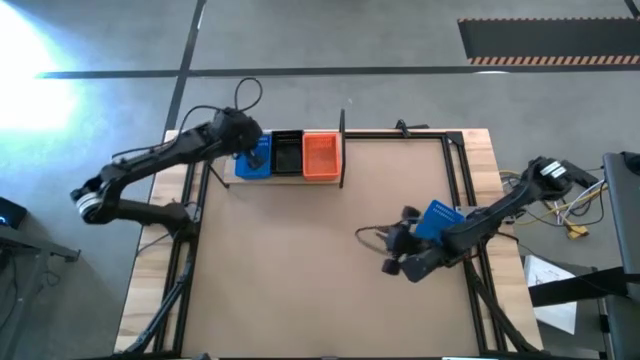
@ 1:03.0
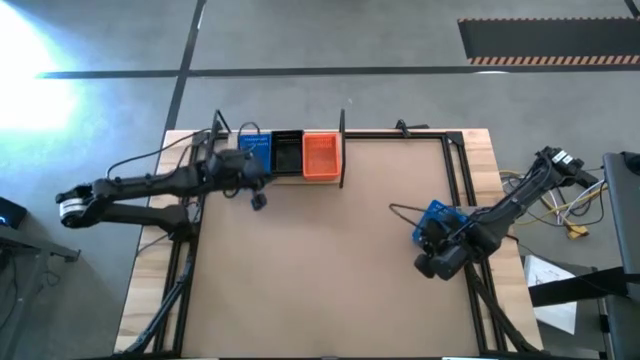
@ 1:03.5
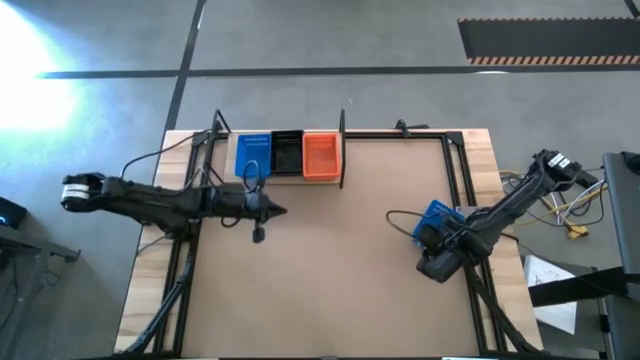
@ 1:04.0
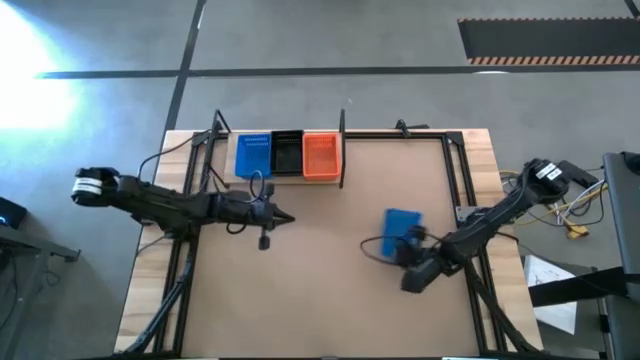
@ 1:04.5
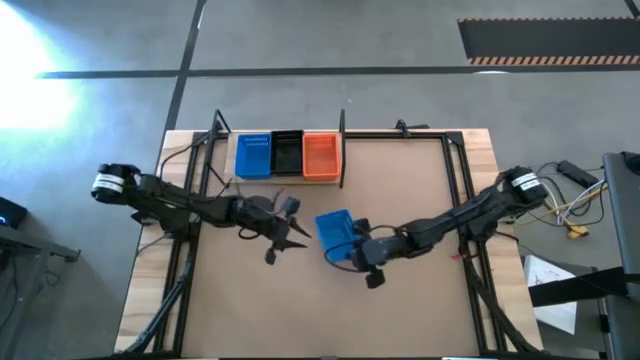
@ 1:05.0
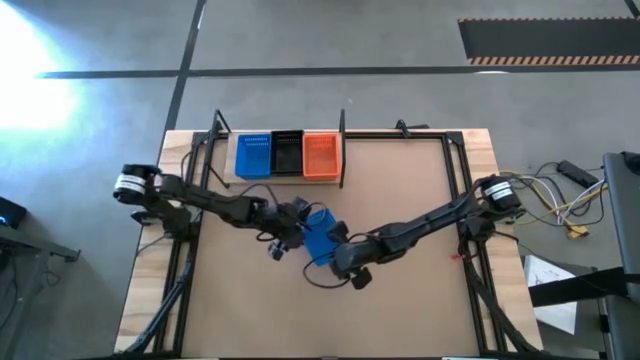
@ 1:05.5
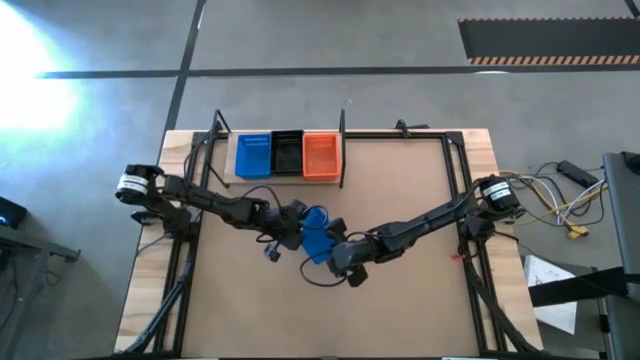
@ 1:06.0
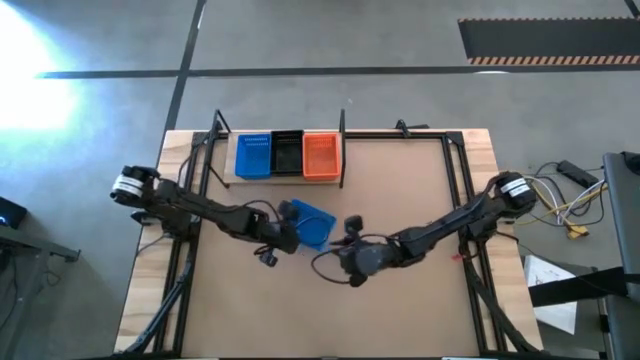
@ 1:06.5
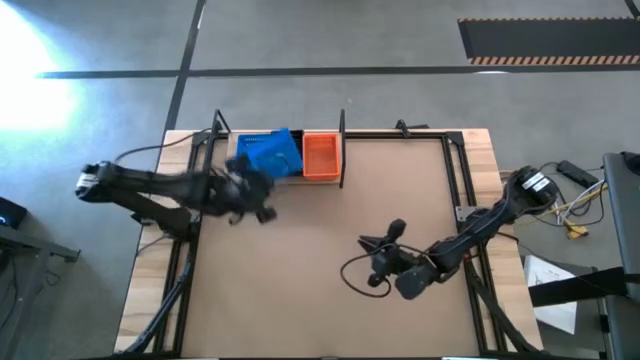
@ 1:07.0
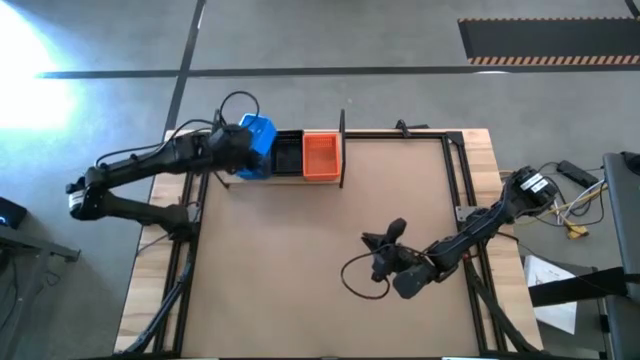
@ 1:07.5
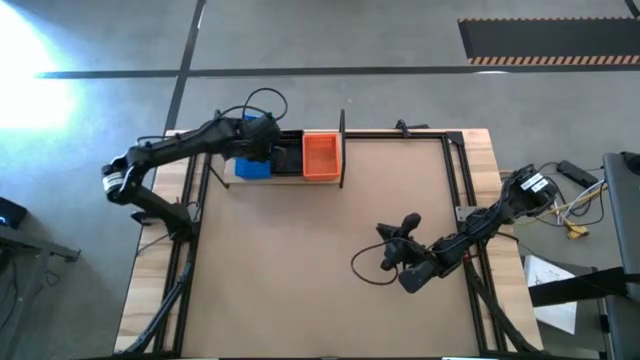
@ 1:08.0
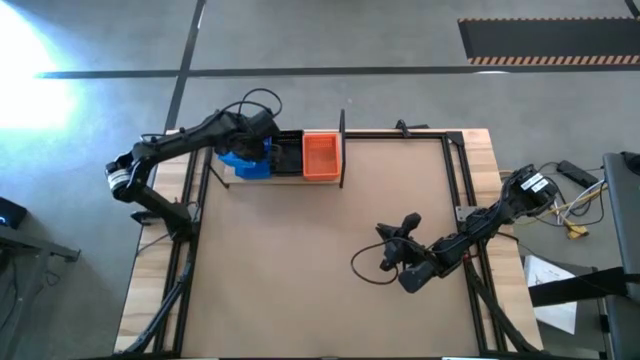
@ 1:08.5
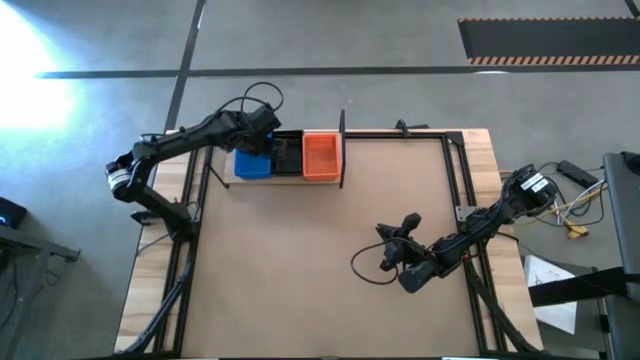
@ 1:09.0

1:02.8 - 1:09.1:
Task: Stack baskets on shelf by color
Stack the blue basket on top of the other blue baskets on the shelf

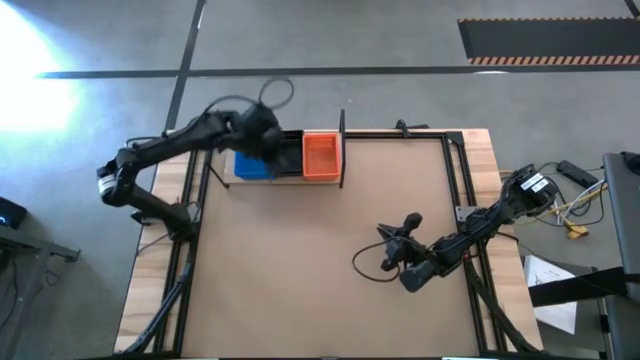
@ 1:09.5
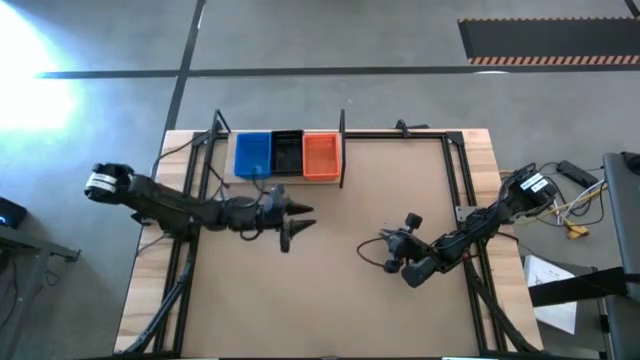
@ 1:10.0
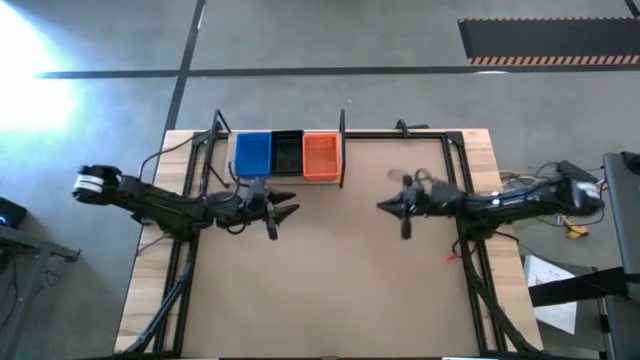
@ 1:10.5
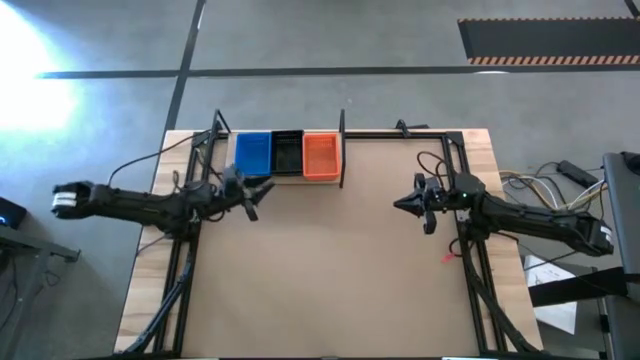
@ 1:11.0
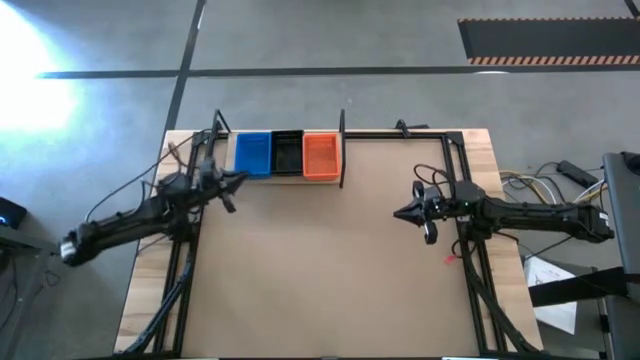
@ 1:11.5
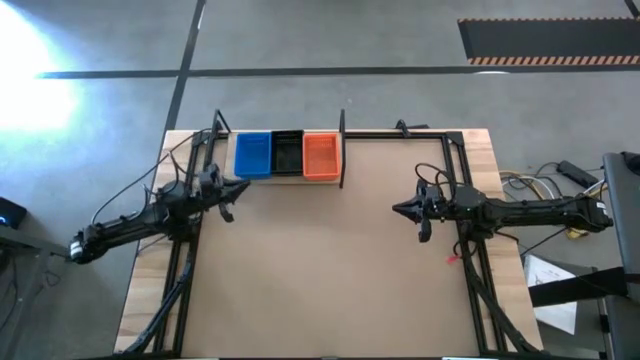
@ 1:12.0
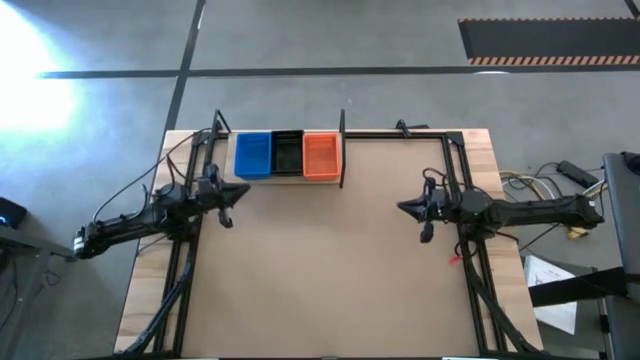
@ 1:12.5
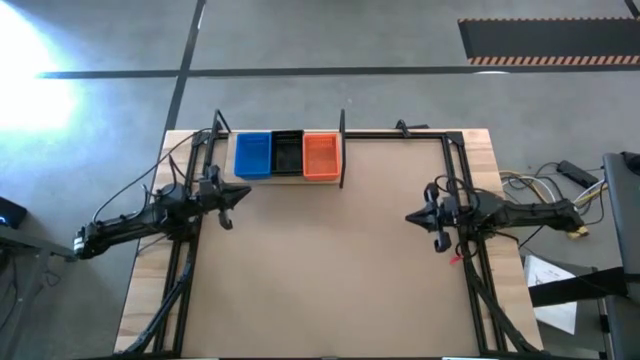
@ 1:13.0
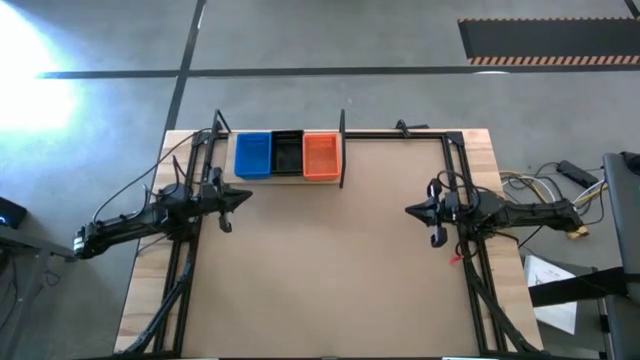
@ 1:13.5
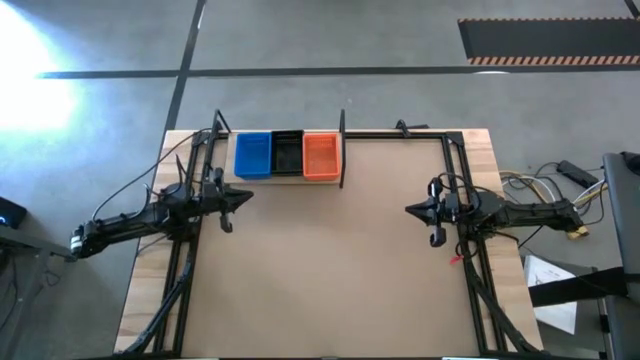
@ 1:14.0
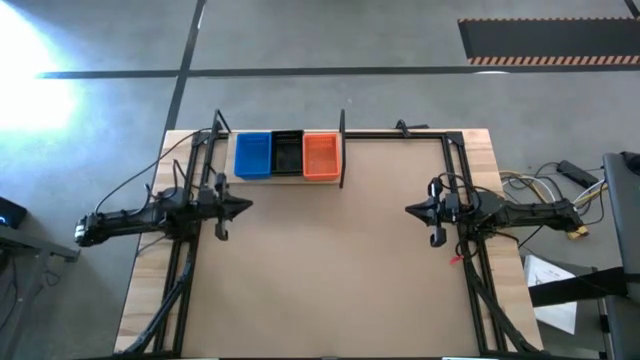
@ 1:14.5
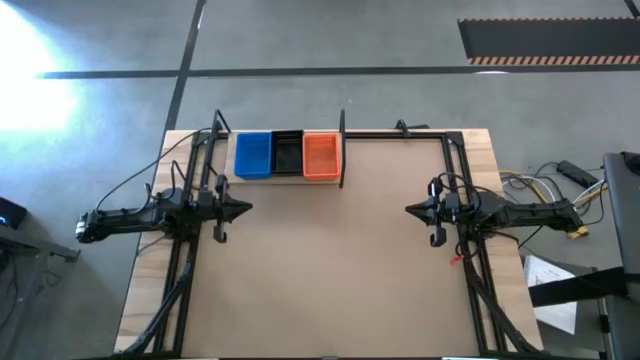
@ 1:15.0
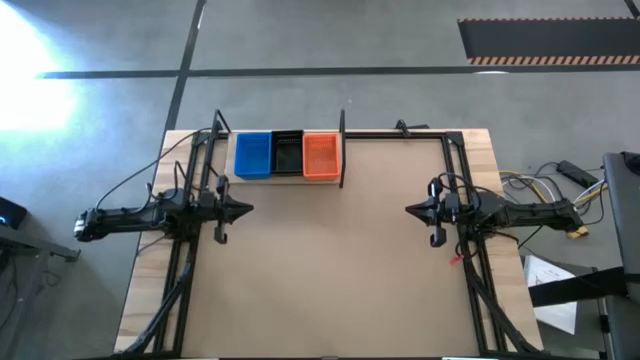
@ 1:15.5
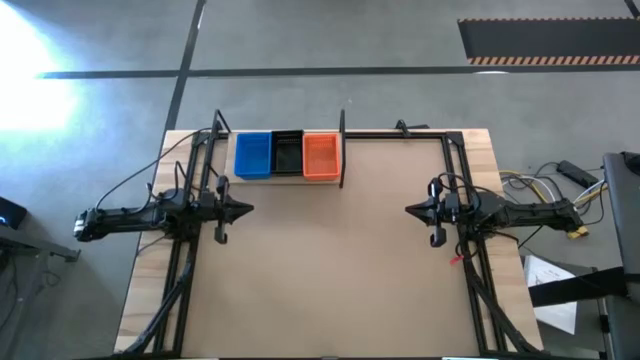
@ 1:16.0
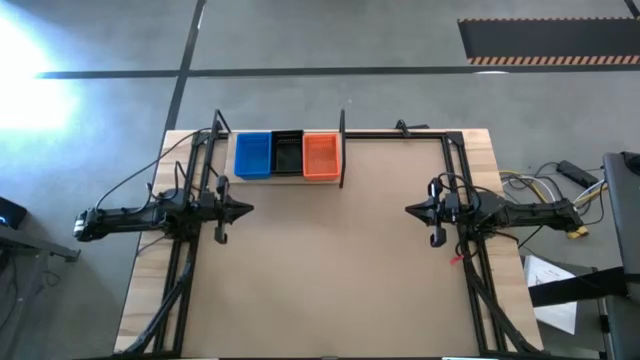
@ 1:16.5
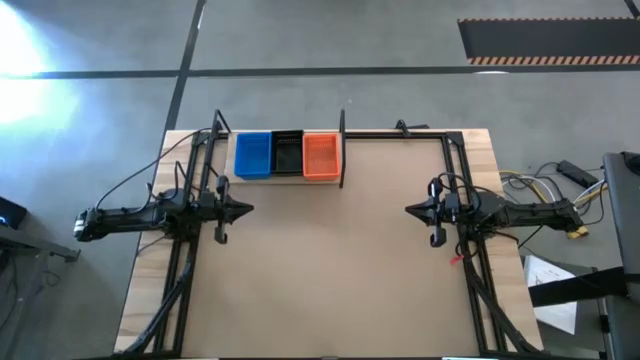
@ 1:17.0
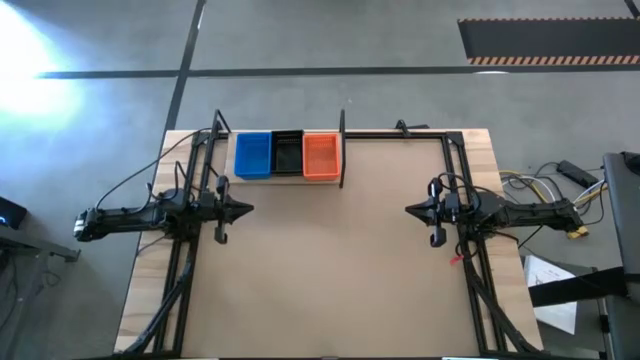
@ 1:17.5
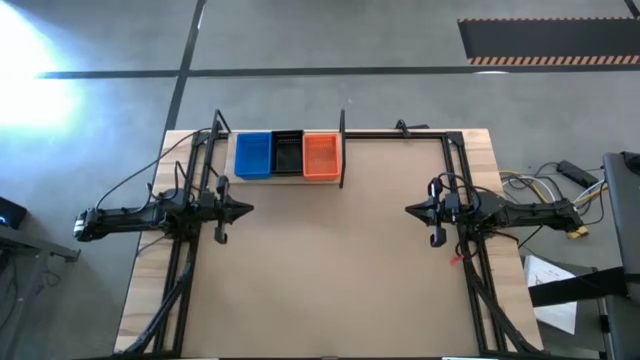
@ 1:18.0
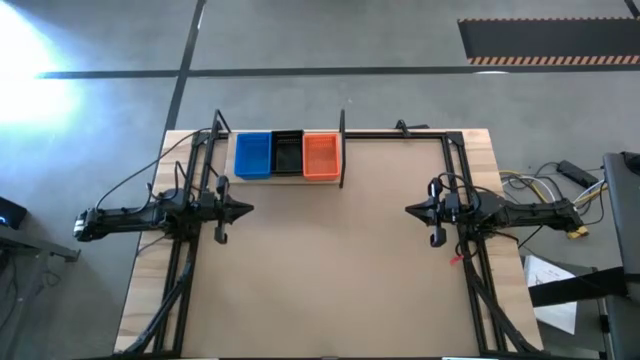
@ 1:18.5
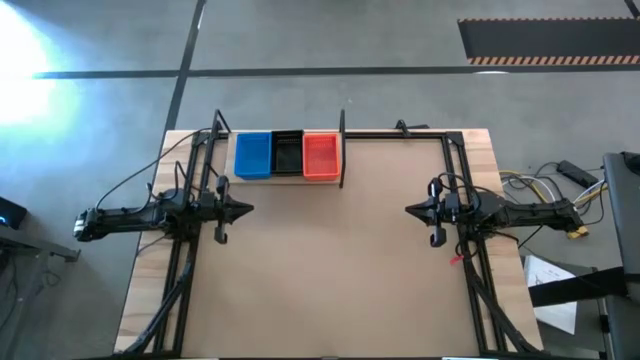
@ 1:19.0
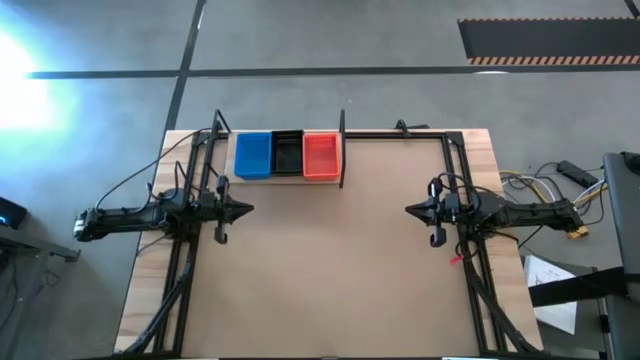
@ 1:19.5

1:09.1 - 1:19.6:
Return to Home Position

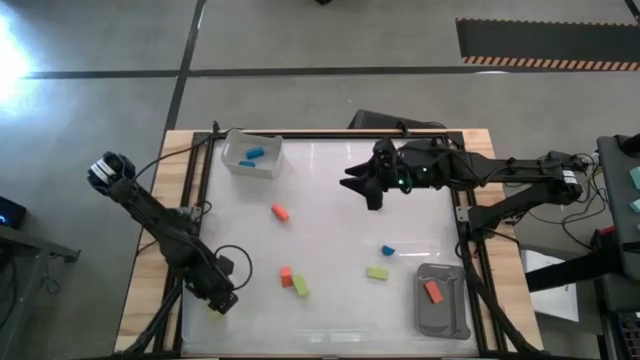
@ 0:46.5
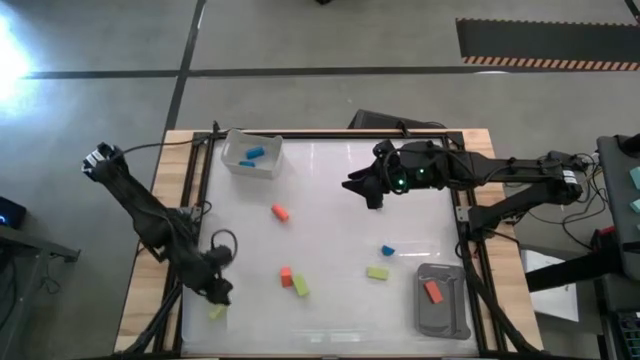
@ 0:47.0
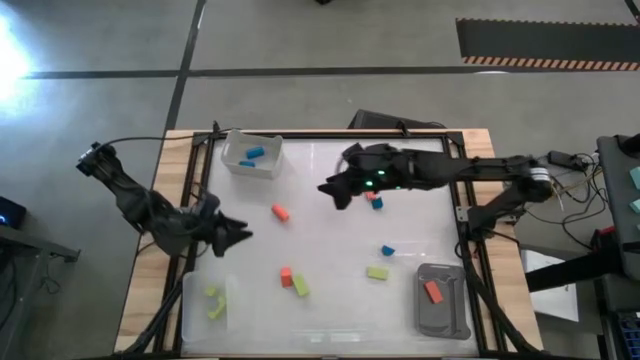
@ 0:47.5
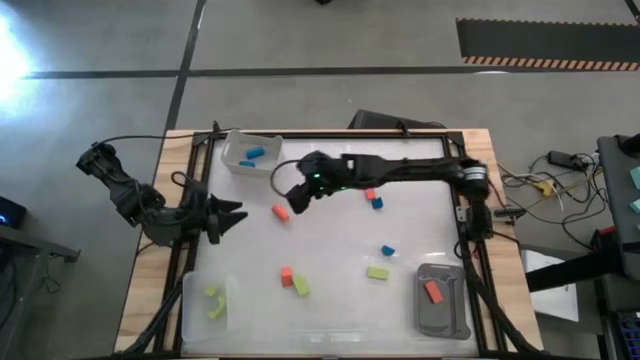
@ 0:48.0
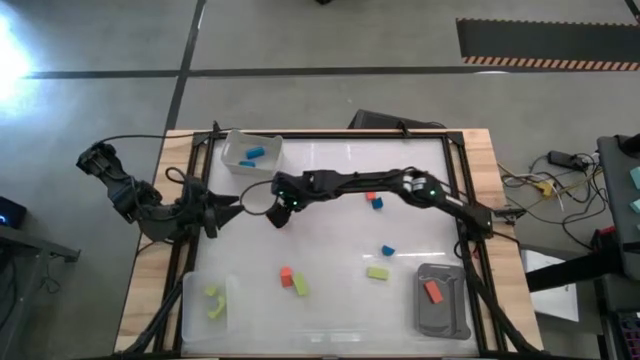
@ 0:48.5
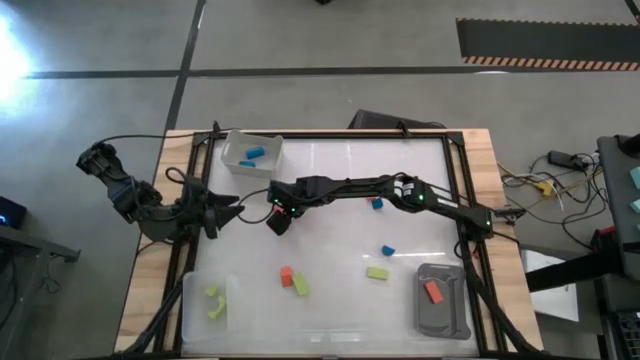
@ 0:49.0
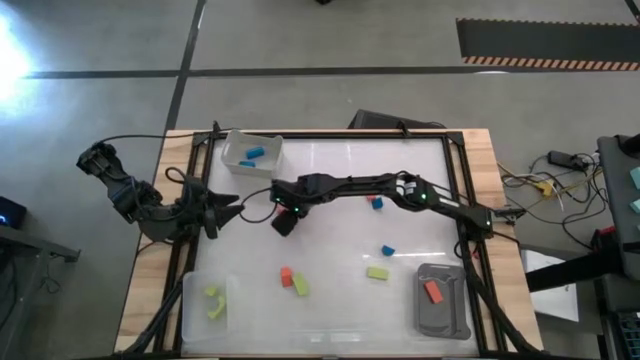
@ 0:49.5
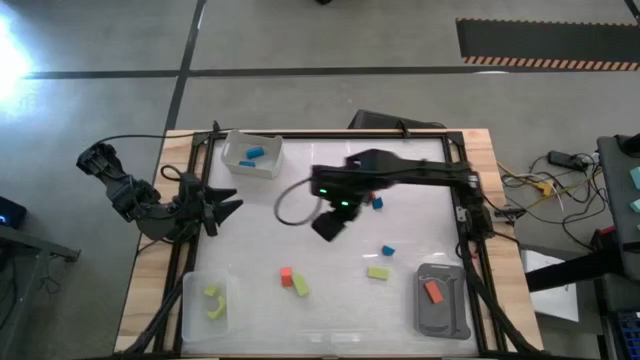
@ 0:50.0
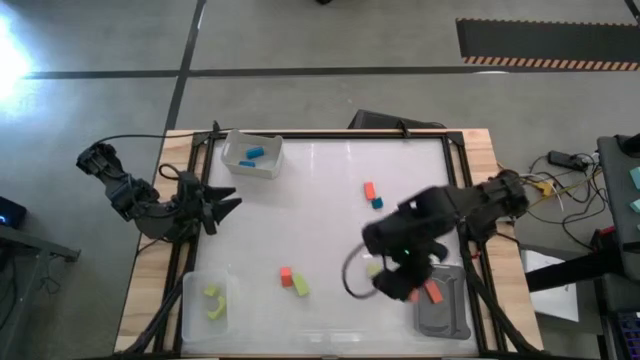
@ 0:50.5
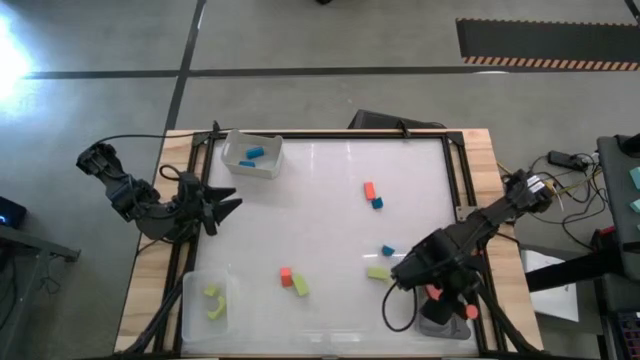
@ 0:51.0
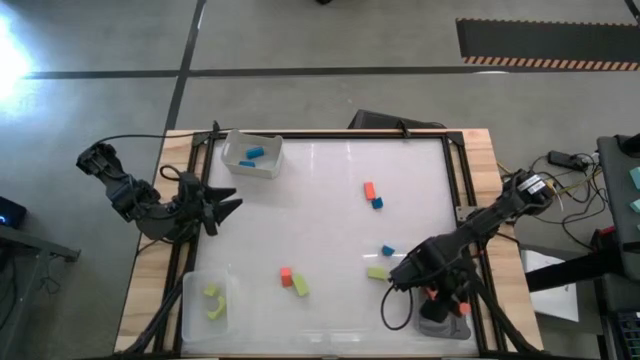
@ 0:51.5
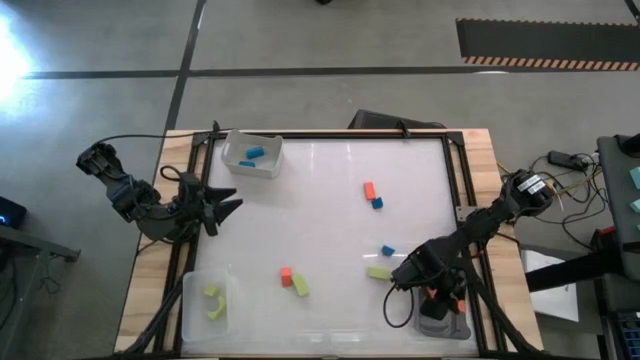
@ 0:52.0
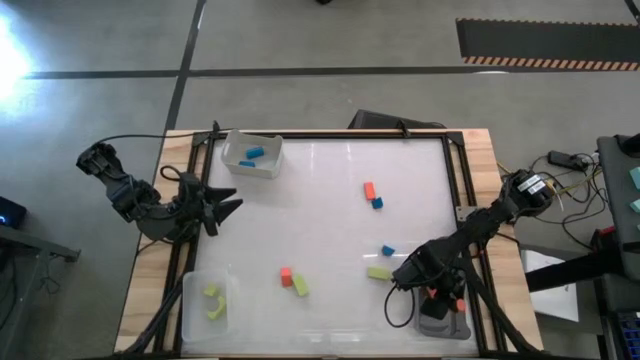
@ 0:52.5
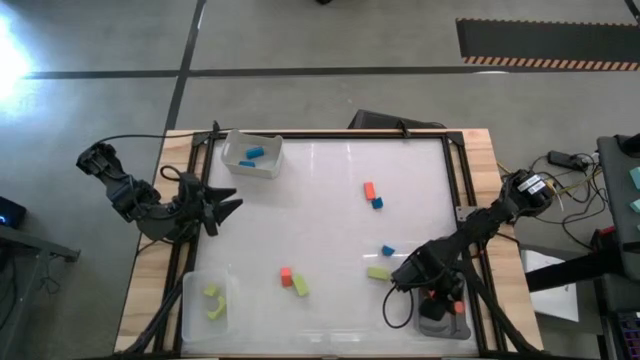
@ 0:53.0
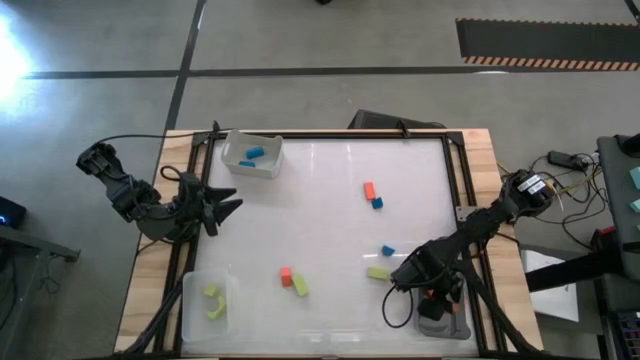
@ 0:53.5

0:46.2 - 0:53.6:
Task: Sort & place blocks by color
Put the orange block into the black bin
